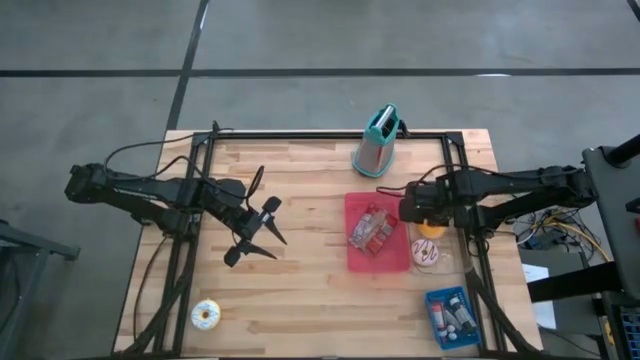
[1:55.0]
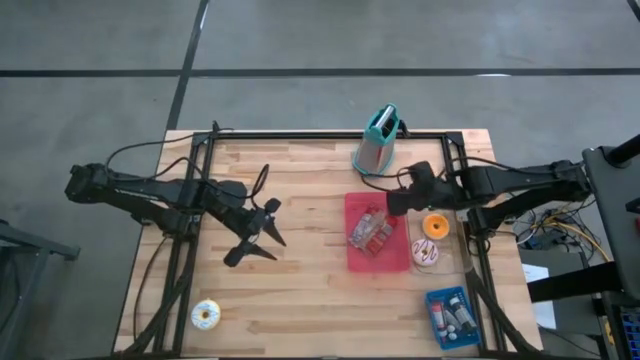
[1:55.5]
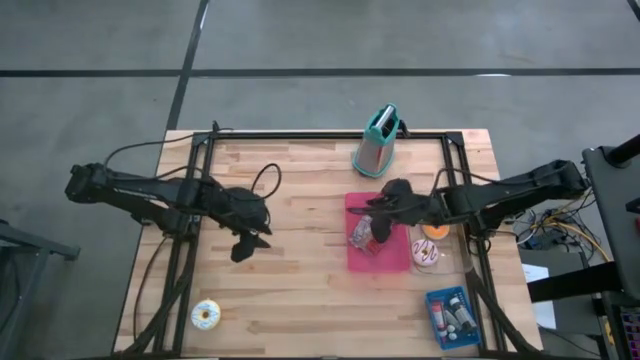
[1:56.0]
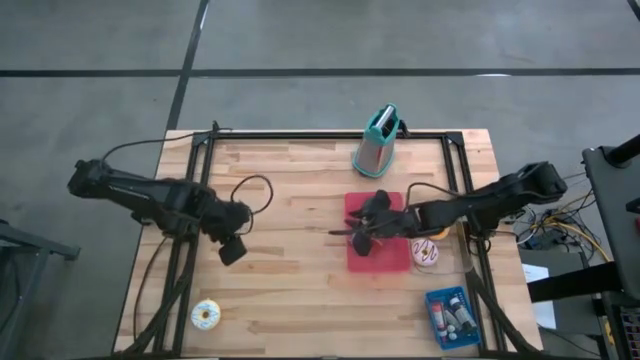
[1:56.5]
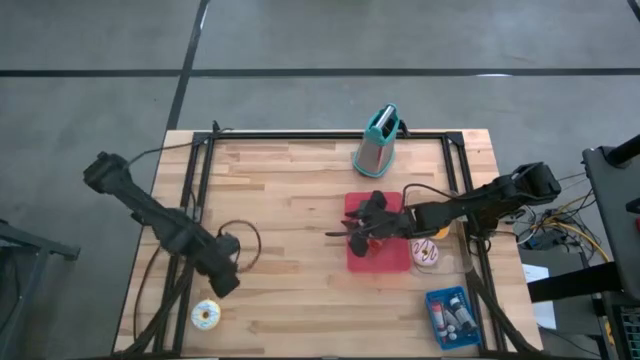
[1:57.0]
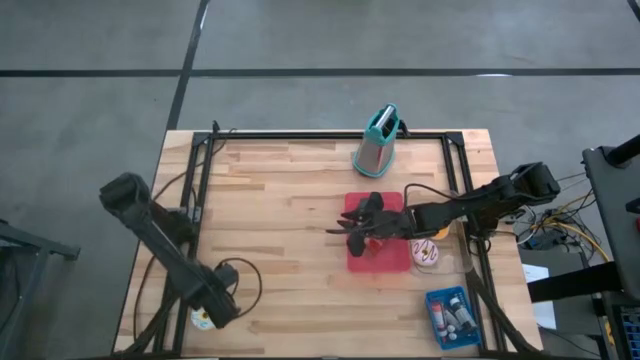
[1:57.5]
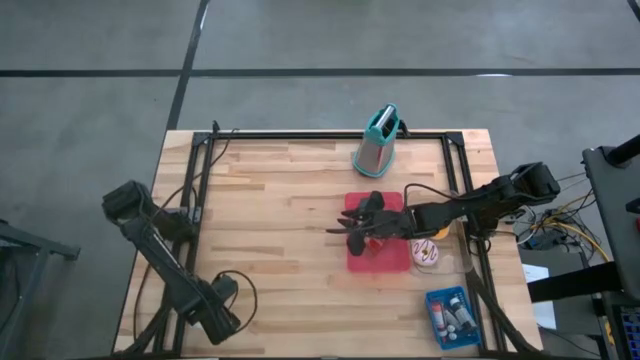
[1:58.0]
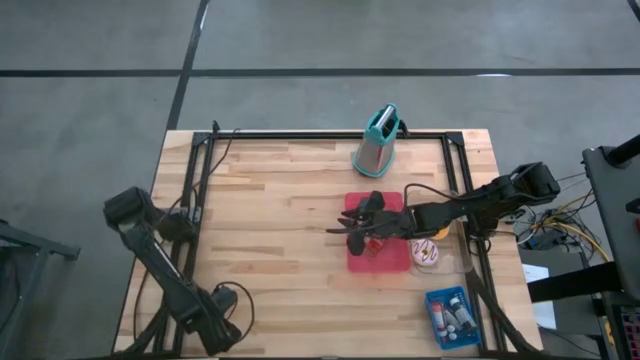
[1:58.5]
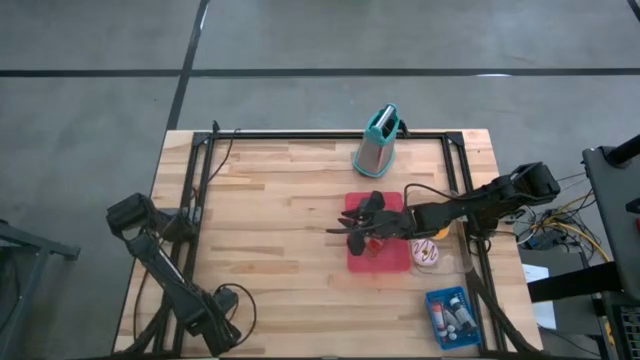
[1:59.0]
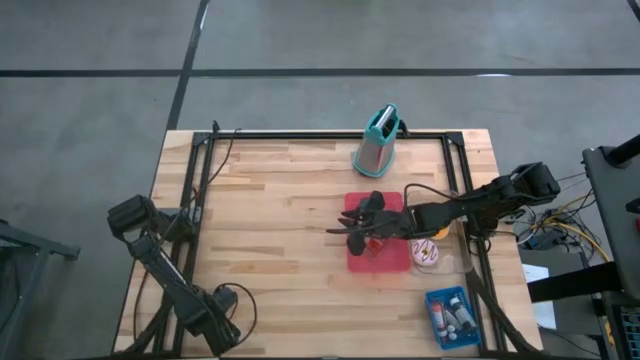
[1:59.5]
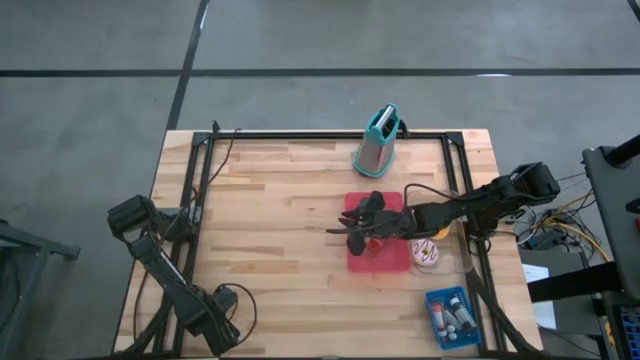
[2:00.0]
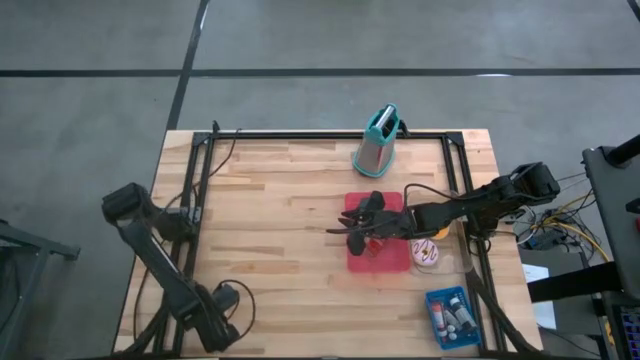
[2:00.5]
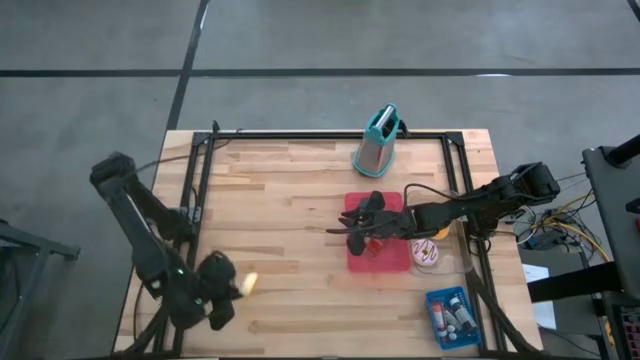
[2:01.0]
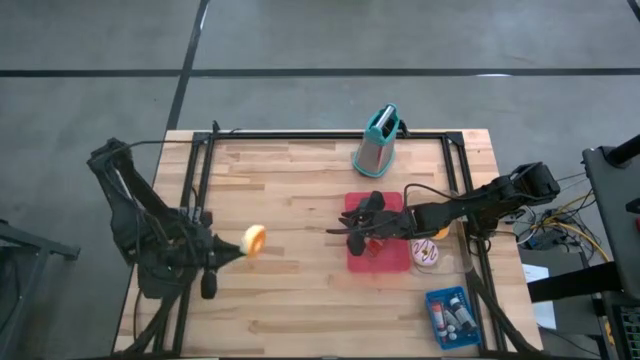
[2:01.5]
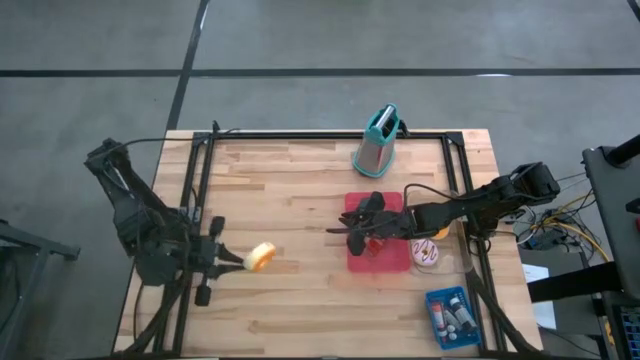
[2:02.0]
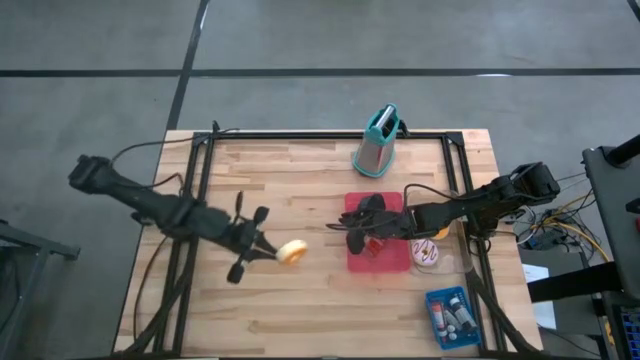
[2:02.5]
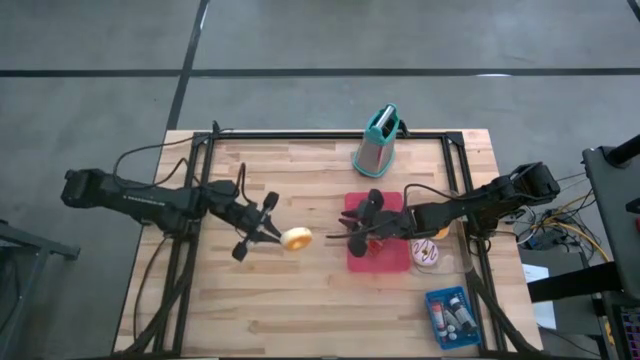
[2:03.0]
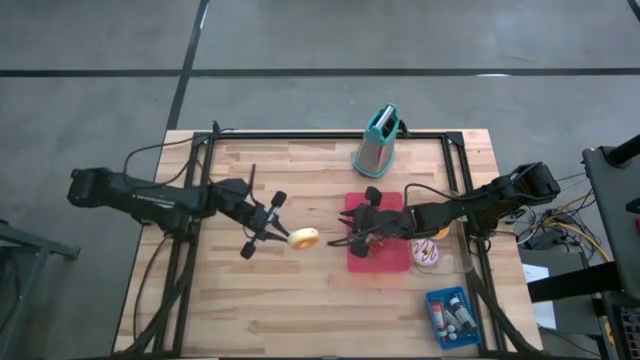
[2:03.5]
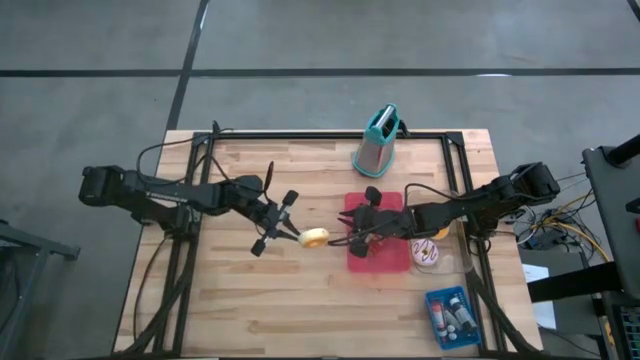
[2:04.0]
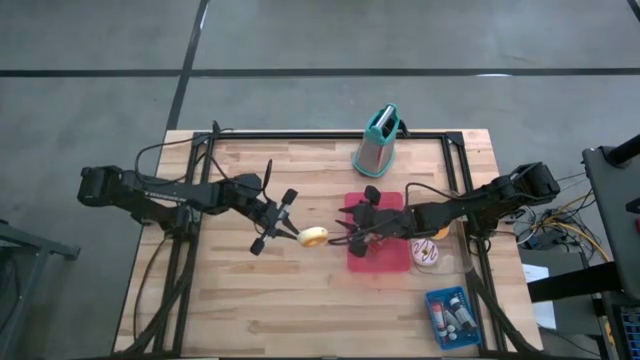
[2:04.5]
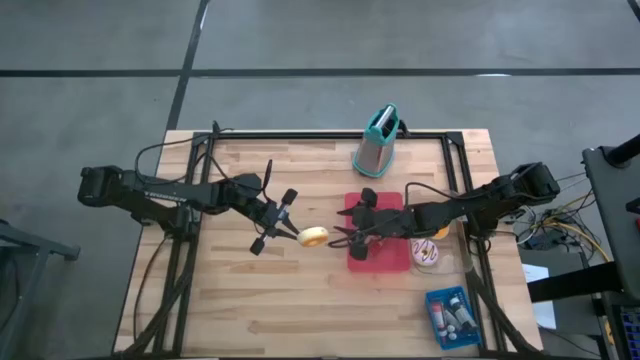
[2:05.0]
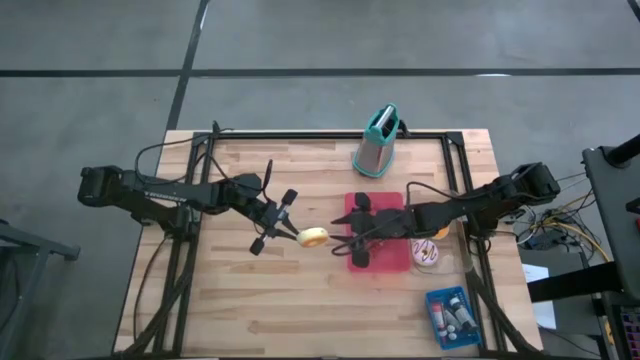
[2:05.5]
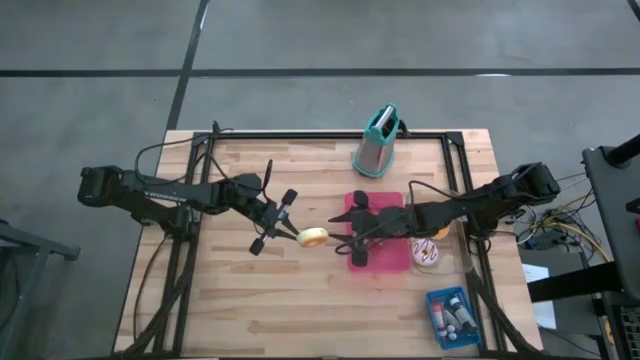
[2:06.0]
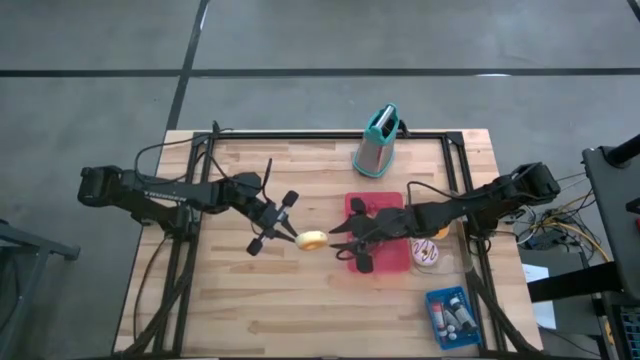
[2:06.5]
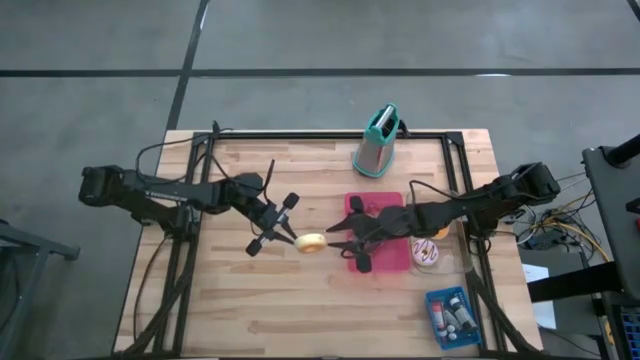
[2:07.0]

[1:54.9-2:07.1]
Task: Pick & Place Food Item
Put the white donut into the transparent bin

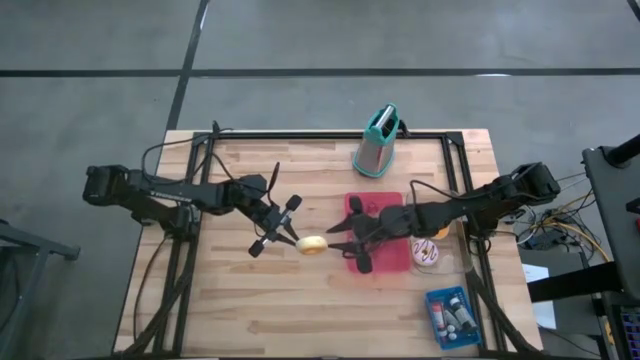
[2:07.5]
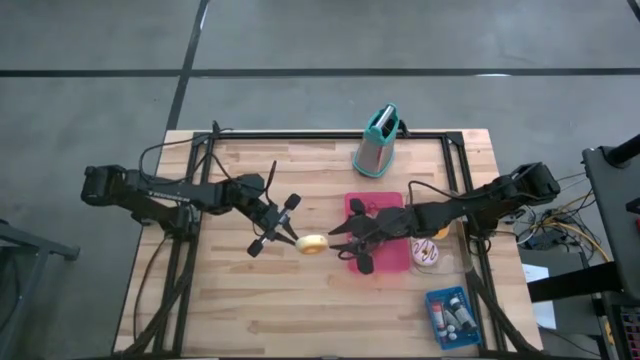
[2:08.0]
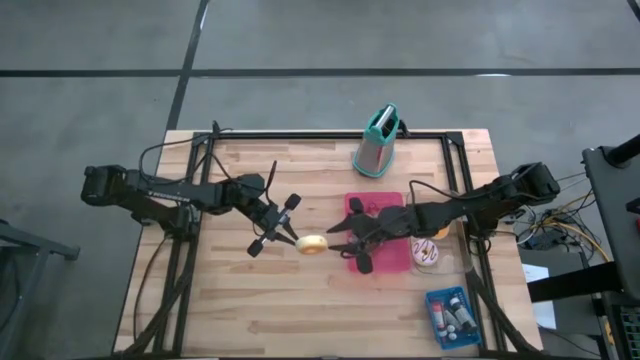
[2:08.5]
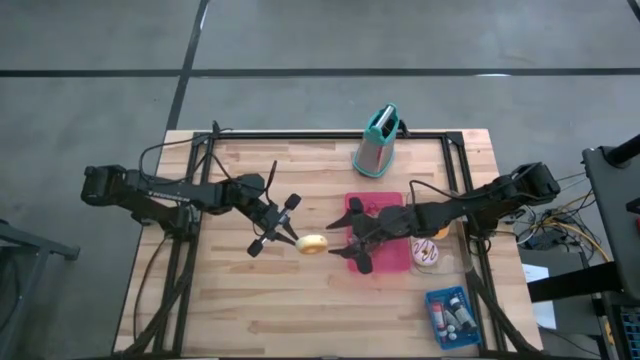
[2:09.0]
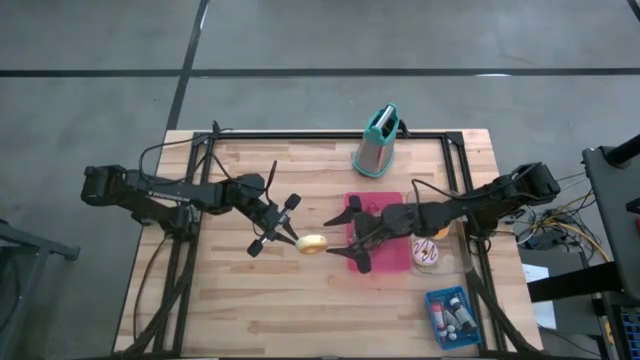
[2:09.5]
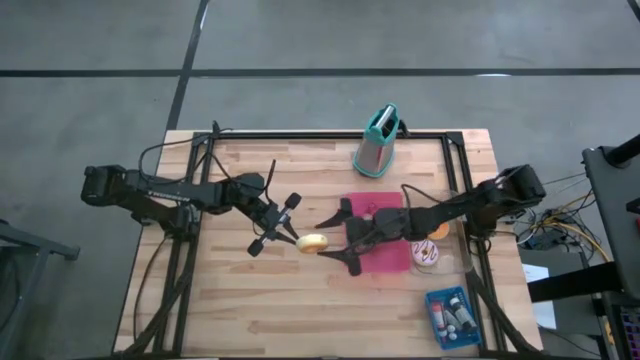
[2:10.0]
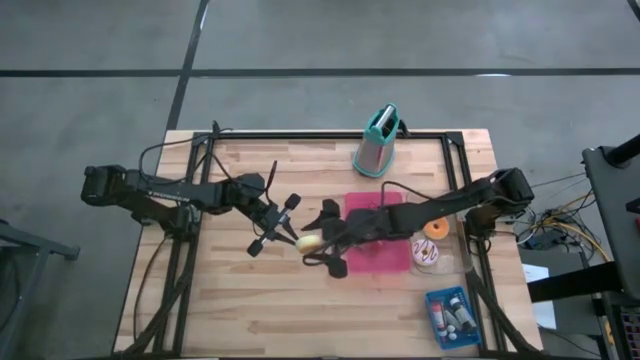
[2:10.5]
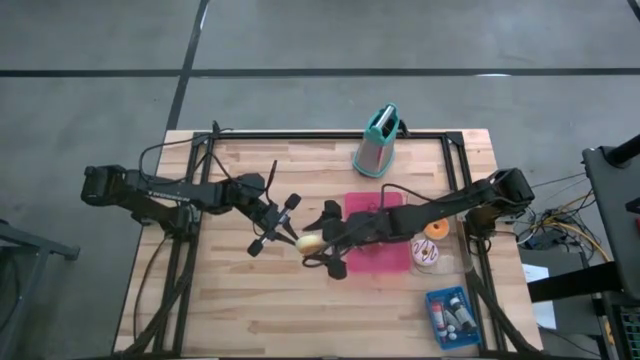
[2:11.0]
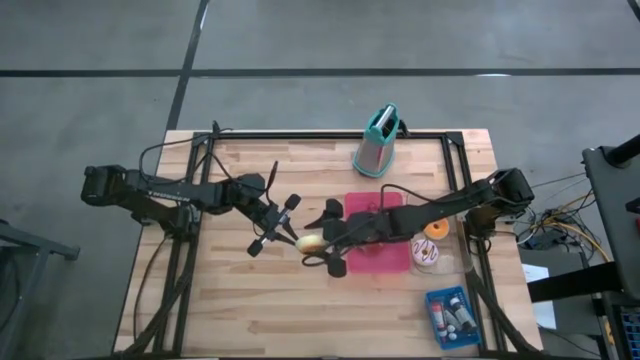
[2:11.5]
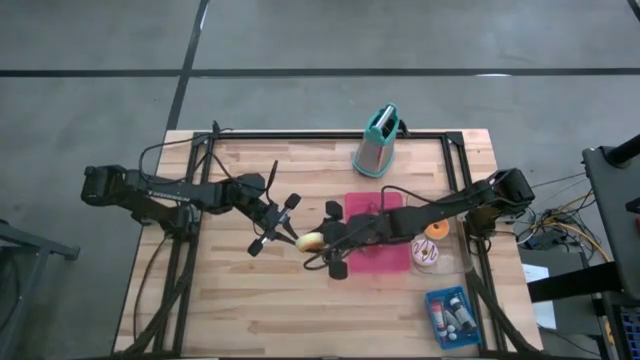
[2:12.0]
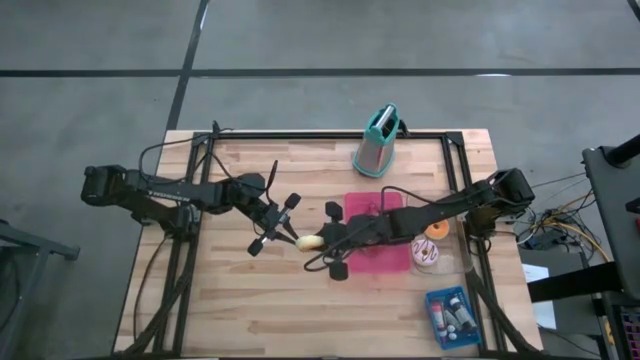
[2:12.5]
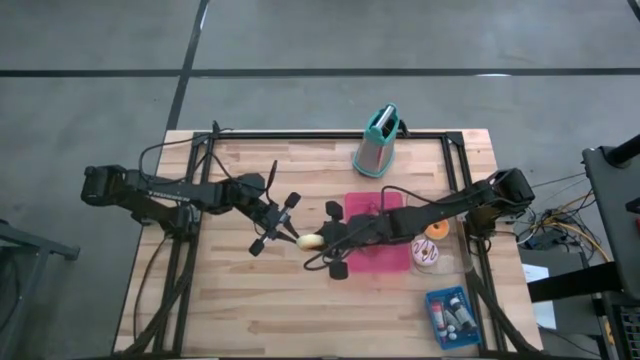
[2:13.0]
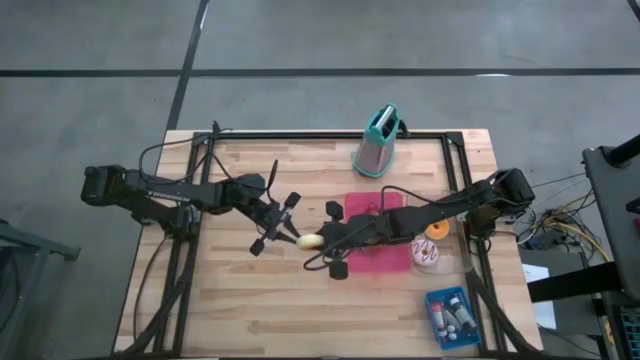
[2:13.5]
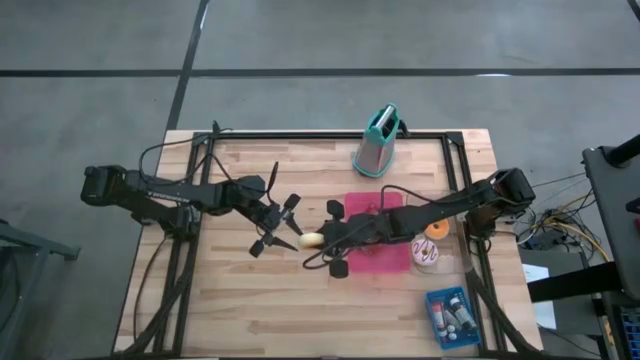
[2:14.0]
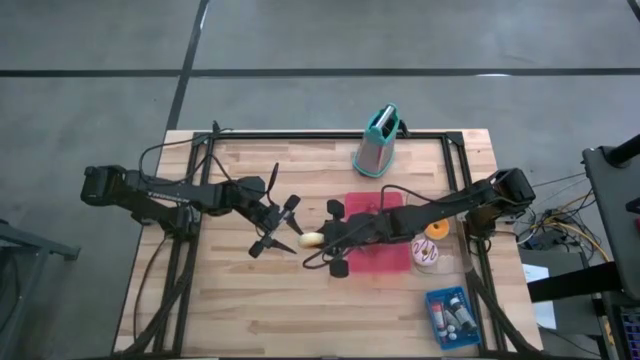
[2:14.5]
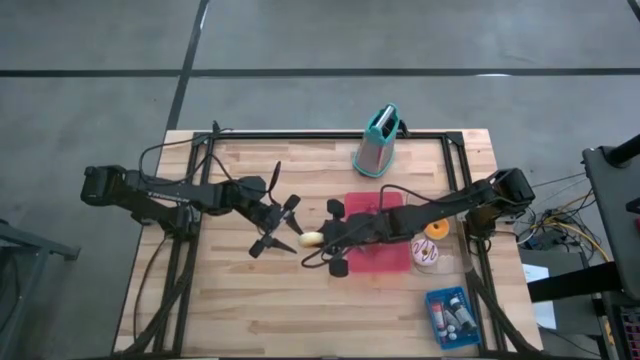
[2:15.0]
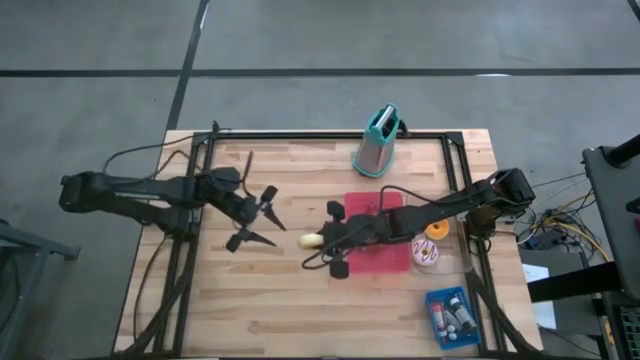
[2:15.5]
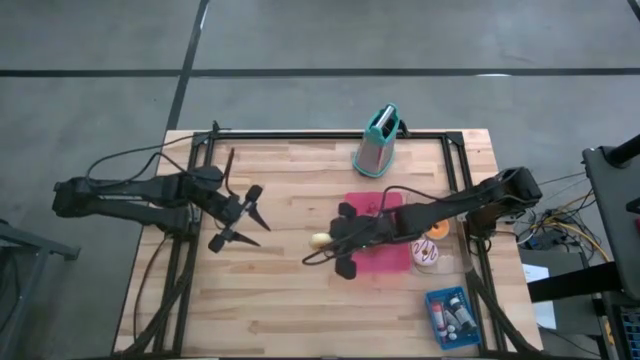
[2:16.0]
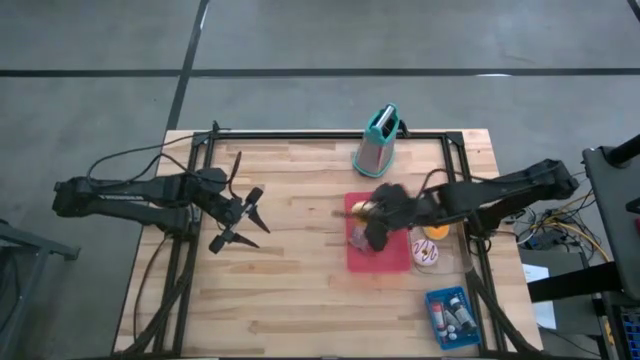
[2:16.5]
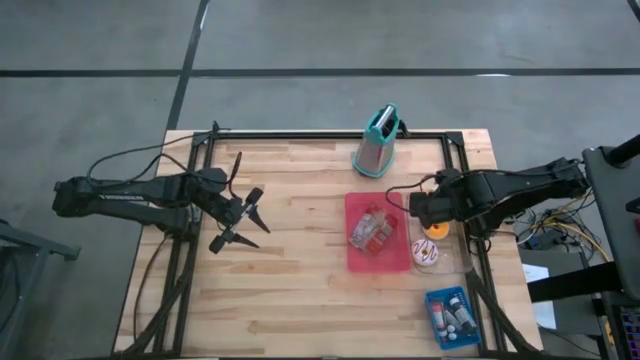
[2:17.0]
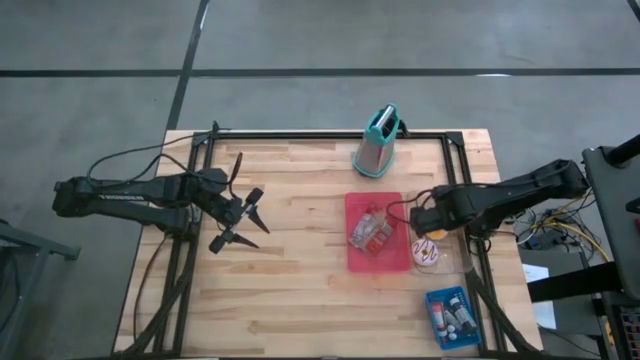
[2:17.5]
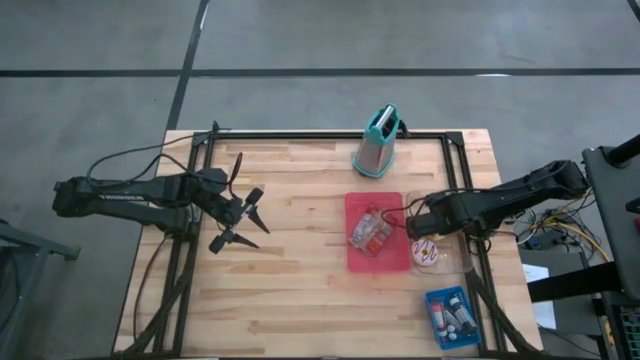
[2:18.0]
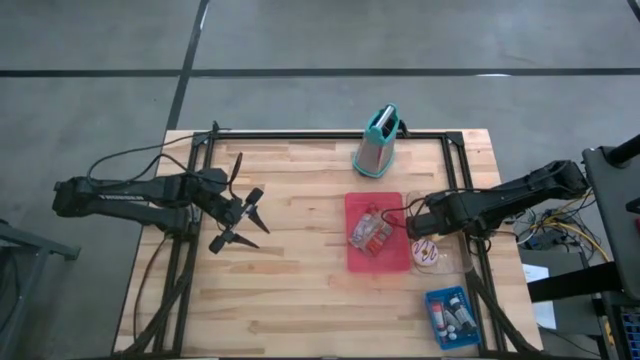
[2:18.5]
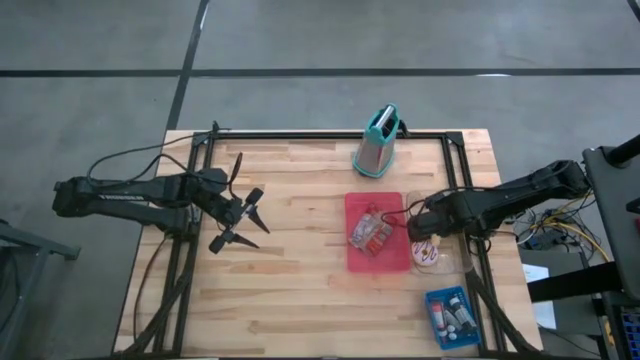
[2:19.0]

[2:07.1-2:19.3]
Put the white donut into the transparent bin
